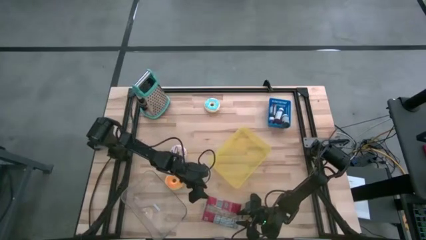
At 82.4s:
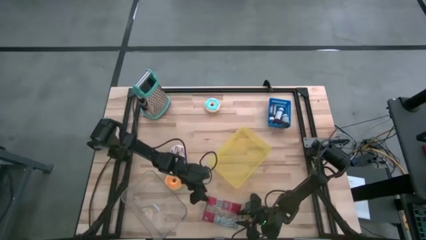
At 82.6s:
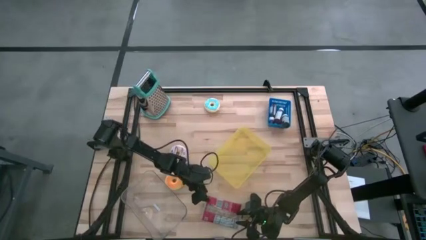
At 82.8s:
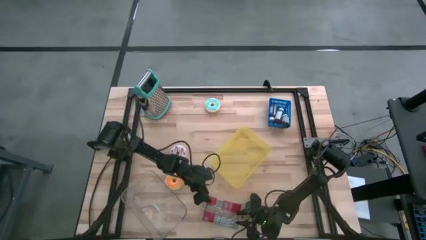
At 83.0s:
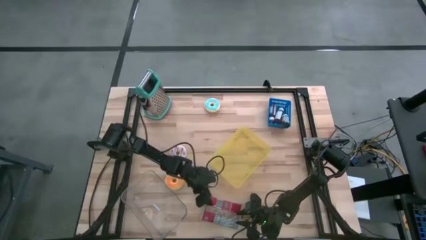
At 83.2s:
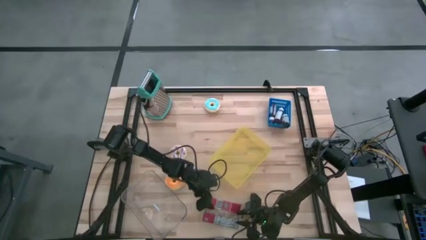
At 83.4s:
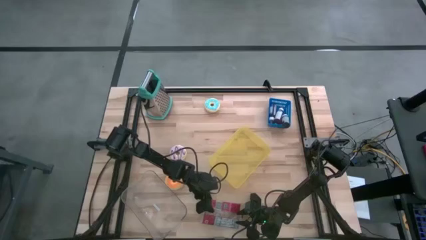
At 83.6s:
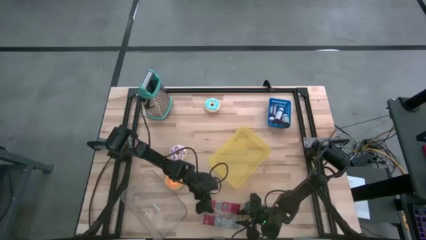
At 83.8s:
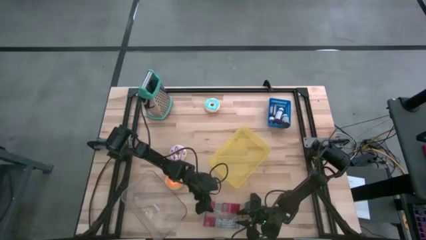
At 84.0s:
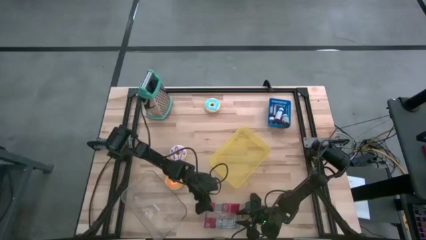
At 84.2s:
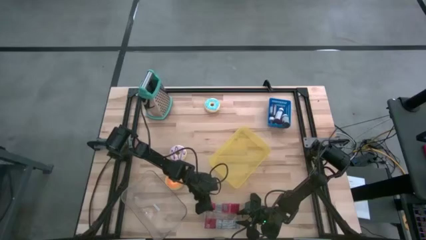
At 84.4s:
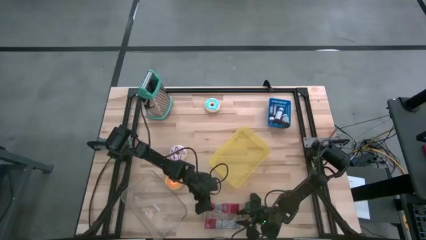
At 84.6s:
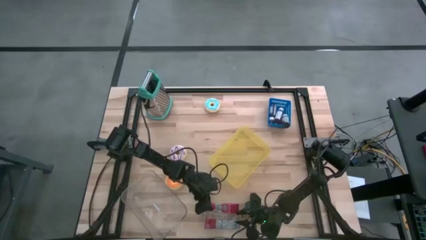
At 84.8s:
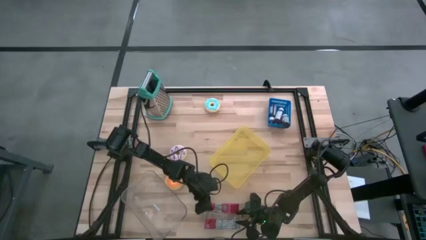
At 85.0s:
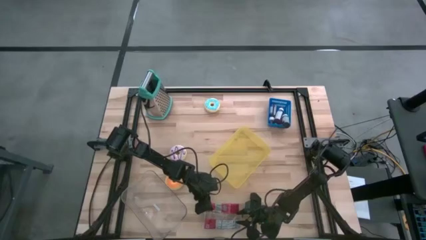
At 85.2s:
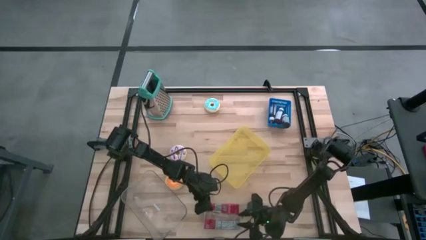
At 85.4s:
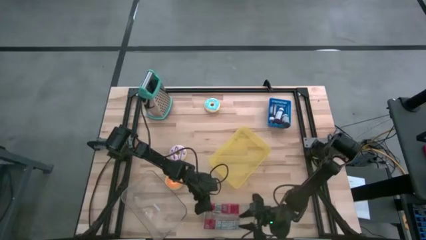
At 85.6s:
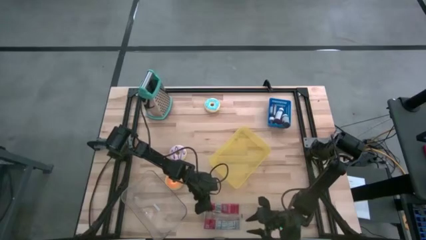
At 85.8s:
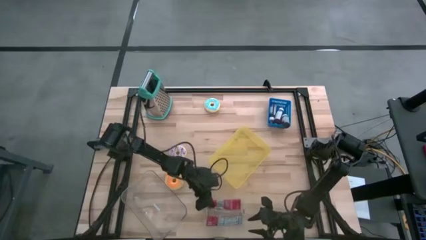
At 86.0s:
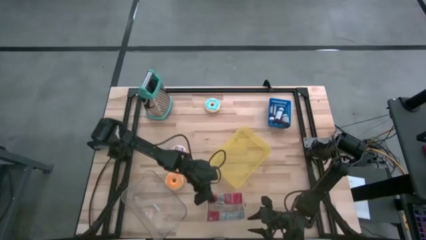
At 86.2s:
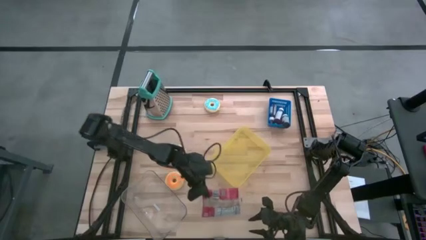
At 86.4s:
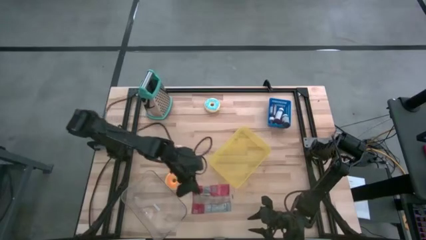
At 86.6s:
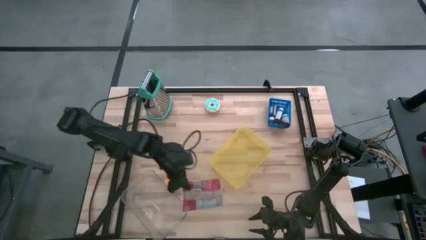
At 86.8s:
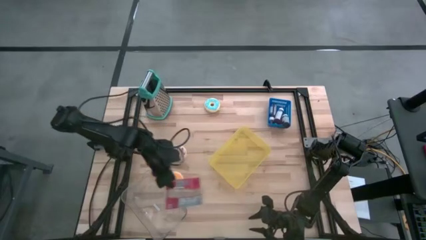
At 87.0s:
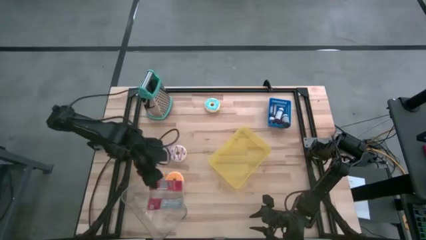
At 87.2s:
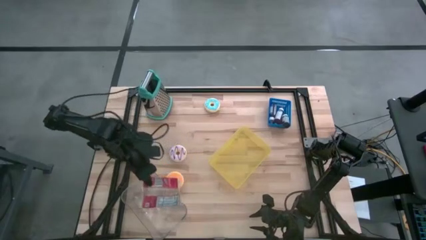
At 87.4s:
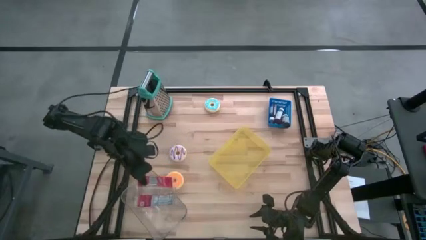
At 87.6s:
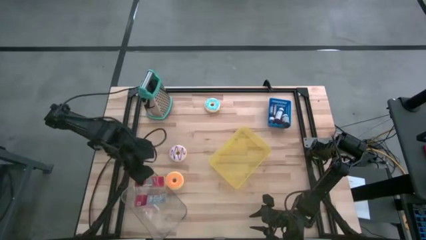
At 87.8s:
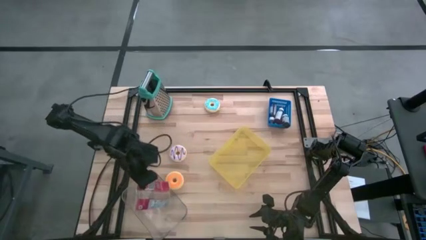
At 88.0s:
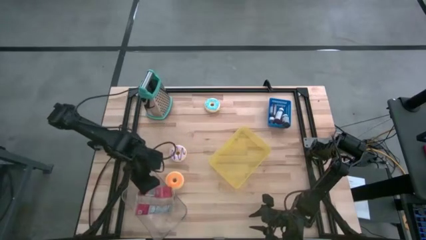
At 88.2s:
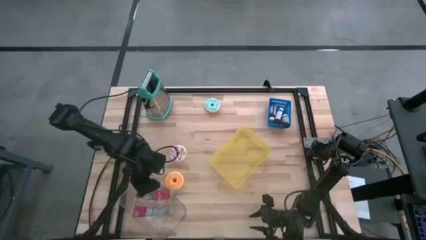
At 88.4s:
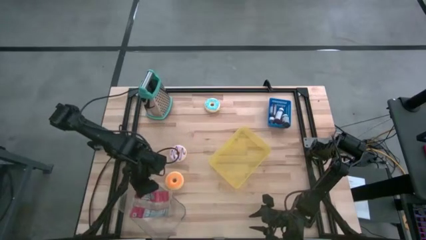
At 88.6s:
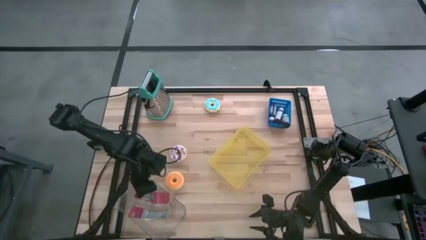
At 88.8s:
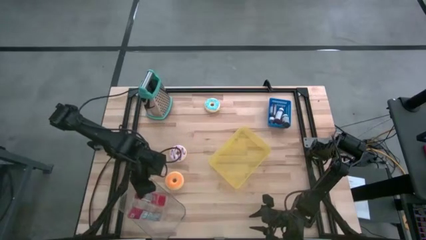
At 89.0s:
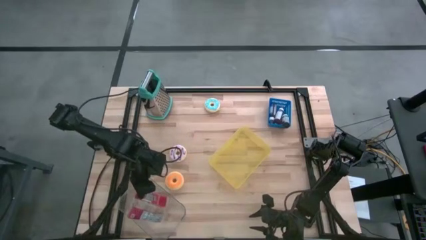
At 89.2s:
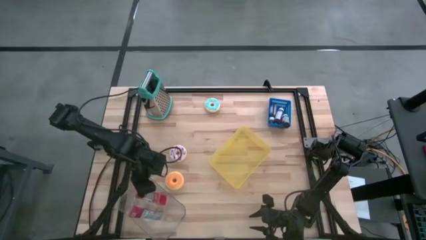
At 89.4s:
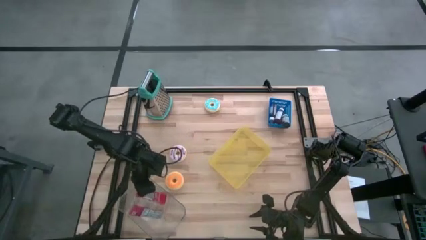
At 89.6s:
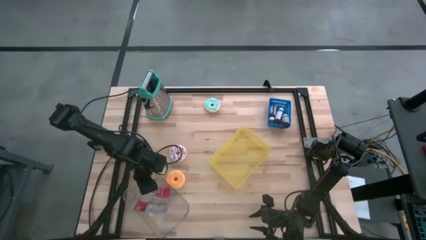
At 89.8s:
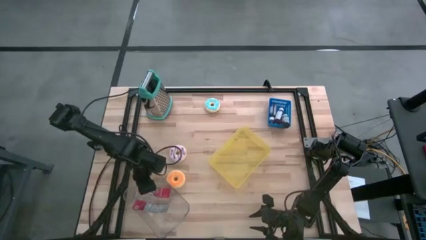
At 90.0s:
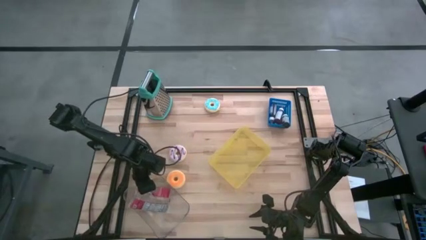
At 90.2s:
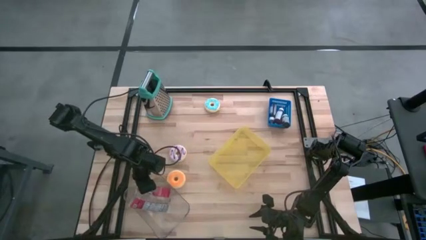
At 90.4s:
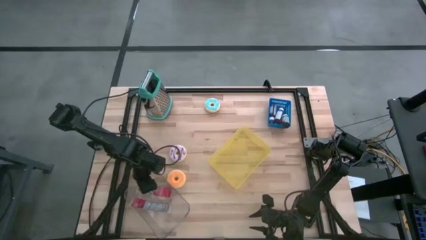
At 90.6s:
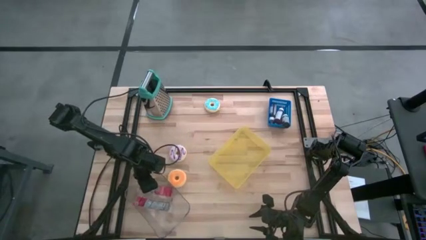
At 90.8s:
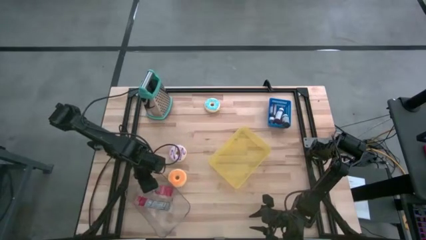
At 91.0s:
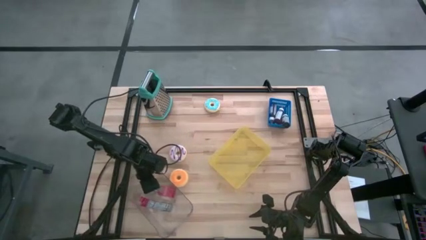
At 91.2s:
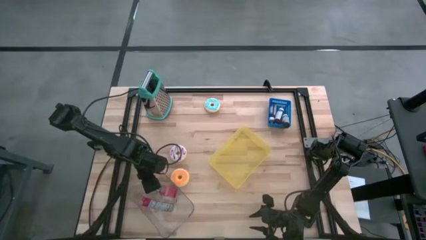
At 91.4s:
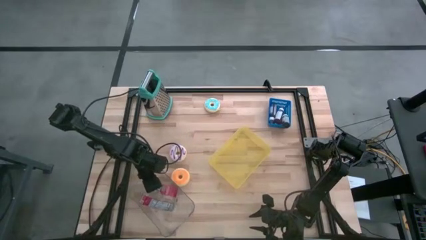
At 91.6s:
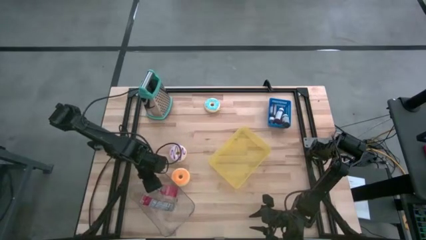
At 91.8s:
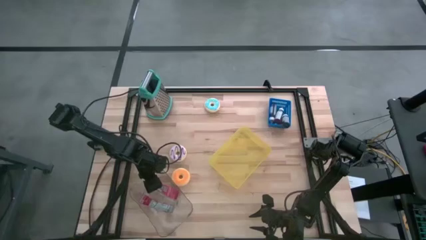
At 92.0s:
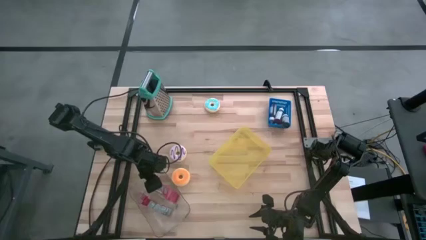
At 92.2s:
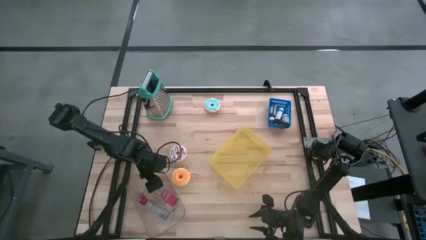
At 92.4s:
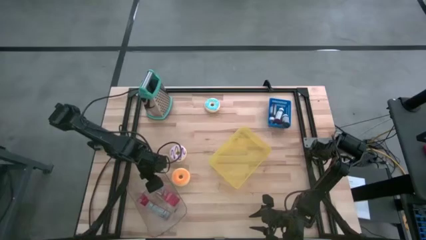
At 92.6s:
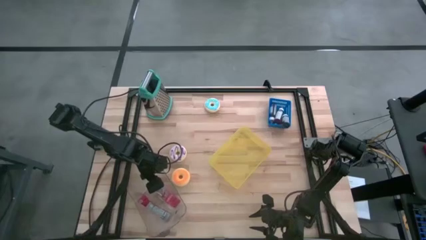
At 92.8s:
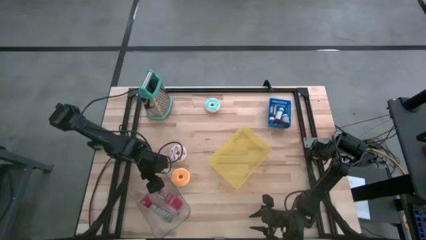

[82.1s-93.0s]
Task: Pick & Place Food Item
Put the red popcorn bag into the transparent bin

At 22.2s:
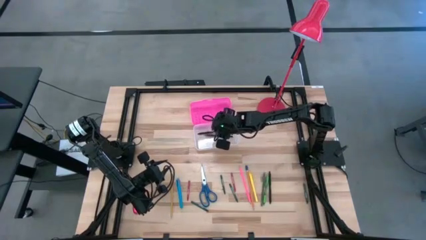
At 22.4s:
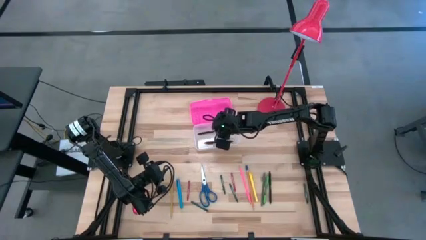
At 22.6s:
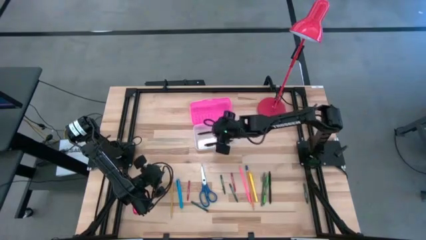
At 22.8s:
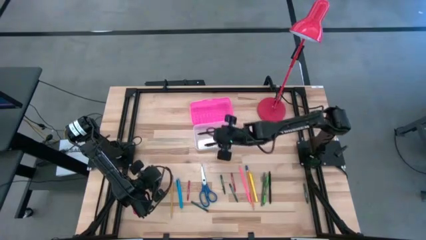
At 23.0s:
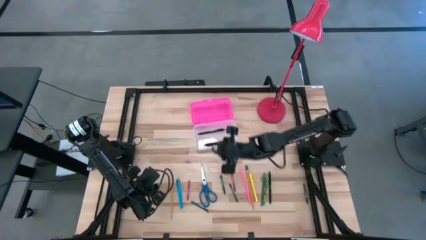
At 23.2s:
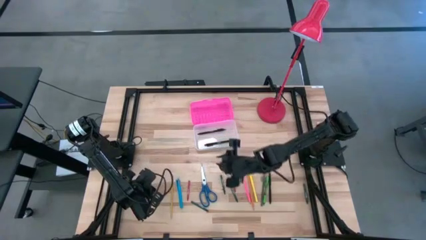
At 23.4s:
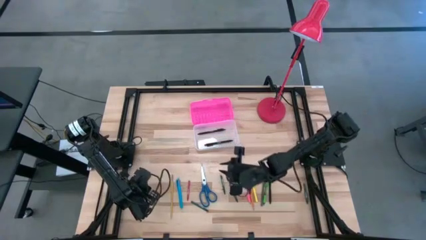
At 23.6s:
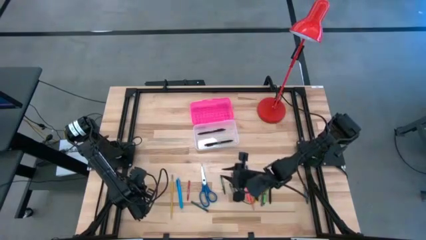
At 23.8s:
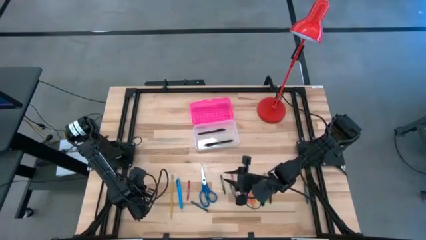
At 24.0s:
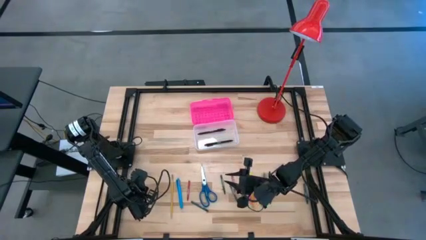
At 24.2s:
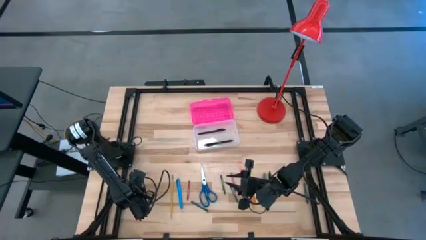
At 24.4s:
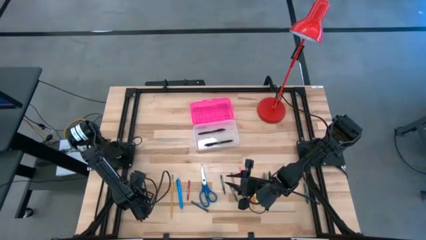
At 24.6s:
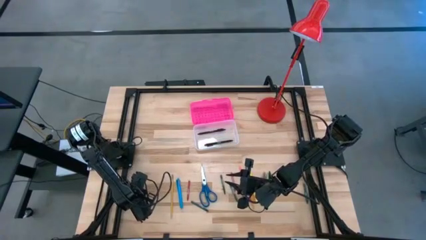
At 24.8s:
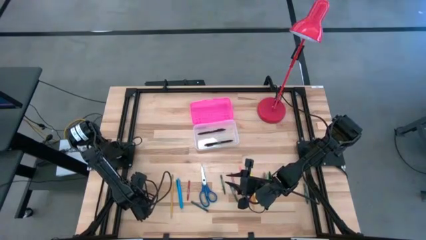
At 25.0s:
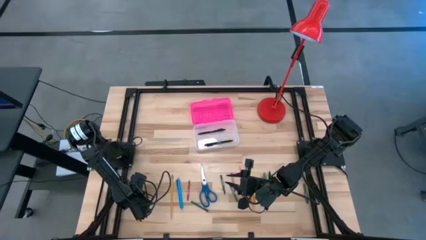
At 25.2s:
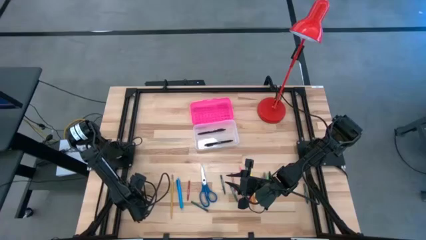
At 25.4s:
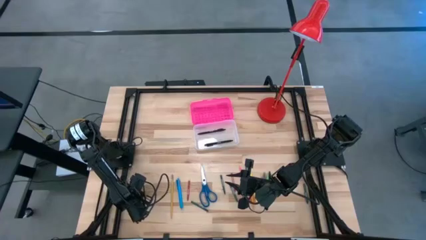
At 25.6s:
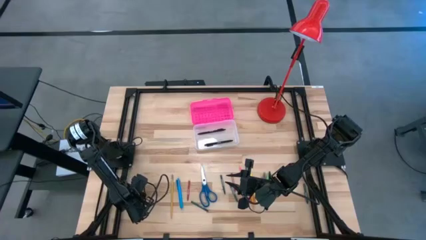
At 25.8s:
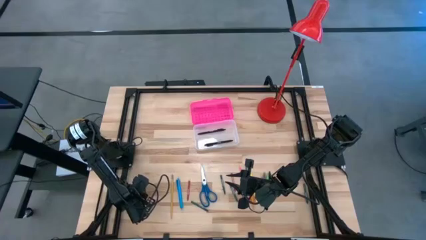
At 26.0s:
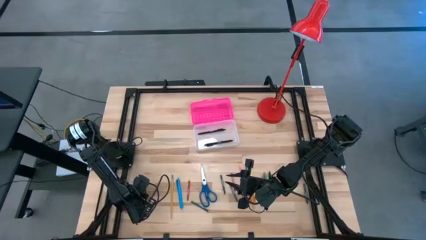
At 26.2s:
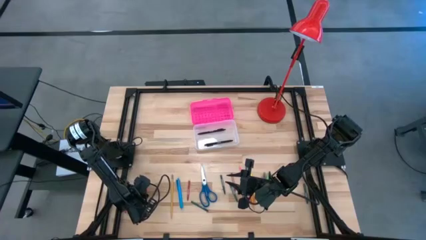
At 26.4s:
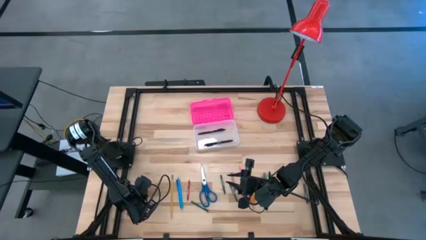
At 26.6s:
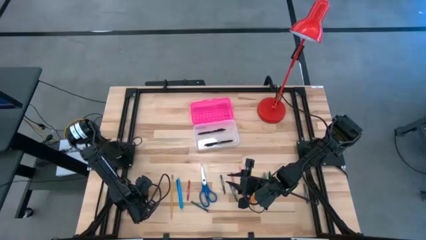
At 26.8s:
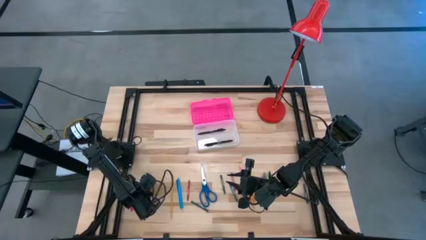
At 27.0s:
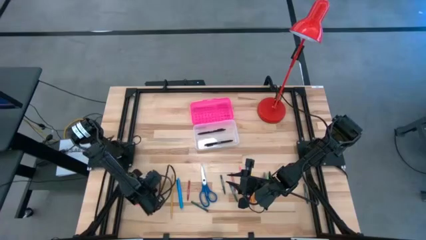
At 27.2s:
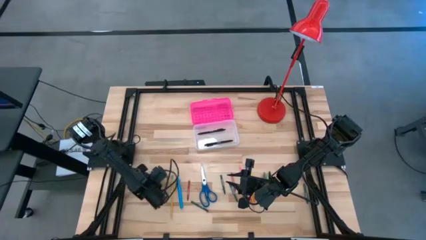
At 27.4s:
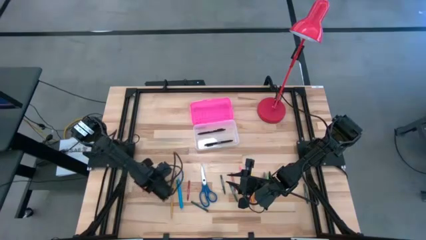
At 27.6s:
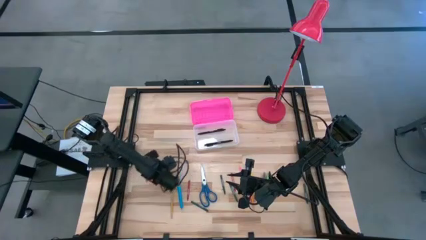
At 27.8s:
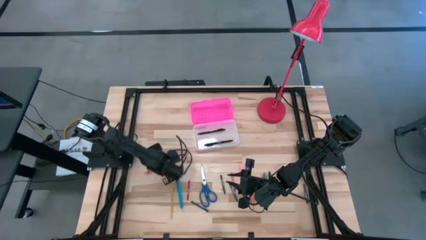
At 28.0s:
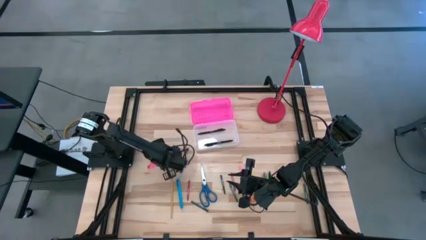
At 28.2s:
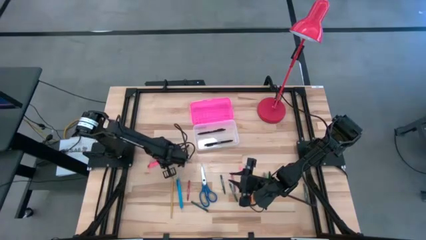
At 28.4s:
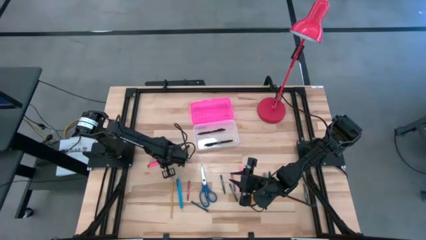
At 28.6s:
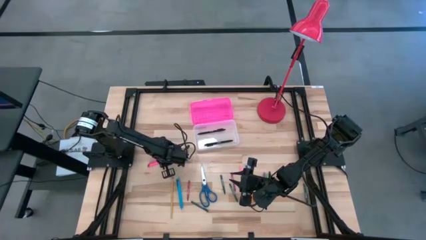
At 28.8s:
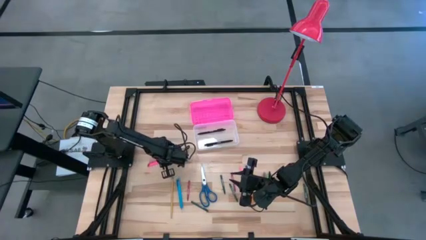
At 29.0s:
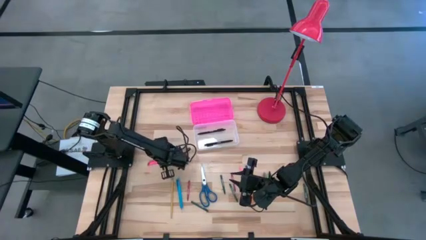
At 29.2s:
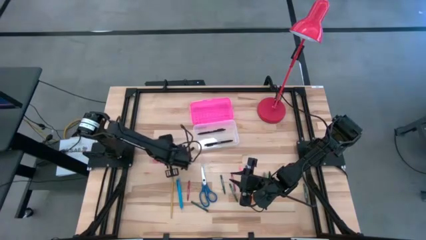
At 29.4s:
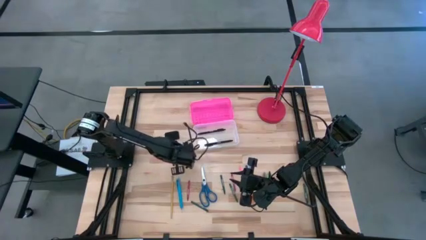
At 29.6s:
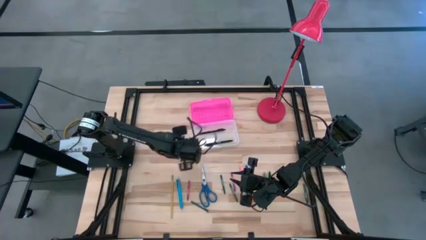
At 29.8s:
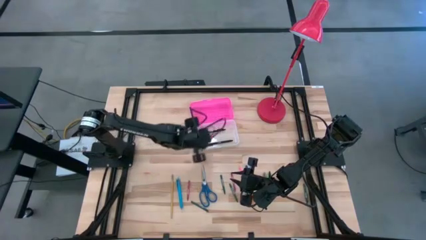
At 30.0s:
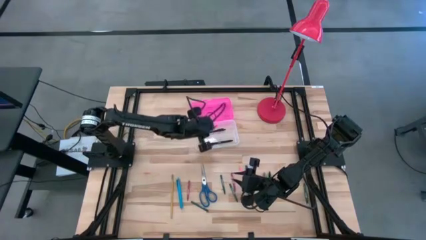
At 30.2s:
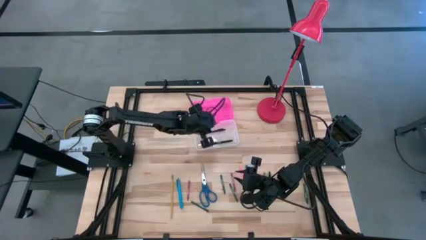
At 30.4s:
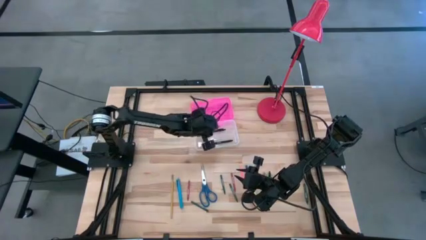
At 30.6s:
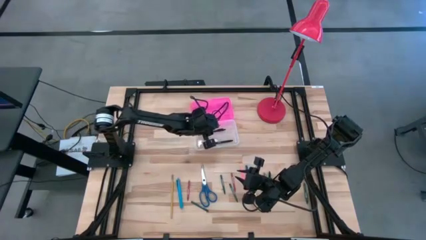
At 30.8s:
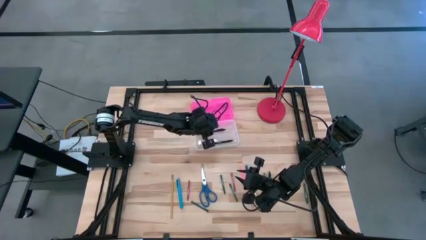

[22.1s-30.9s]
Task: Pick & place school supplies into a supply box
Put the pink pen into the pink supply box
